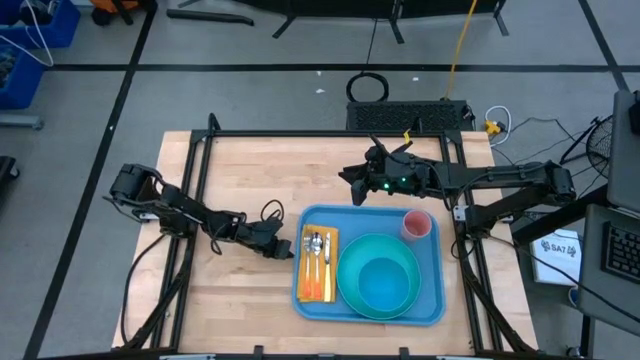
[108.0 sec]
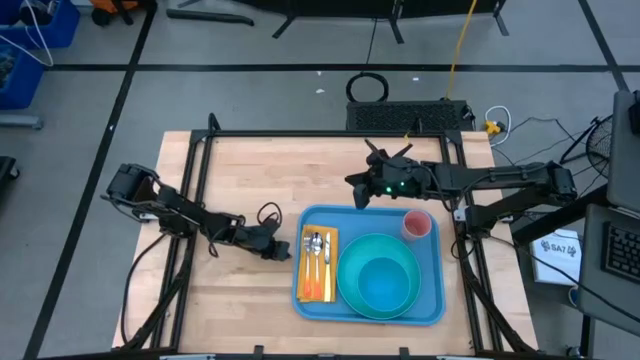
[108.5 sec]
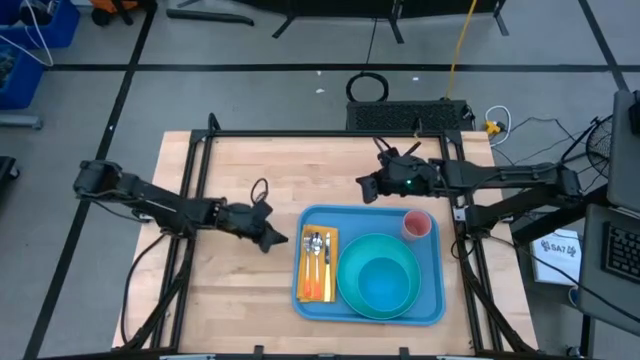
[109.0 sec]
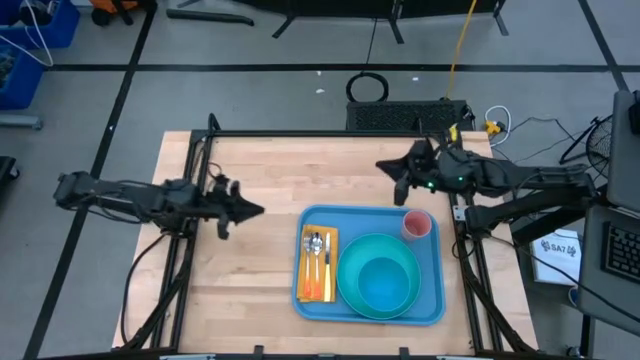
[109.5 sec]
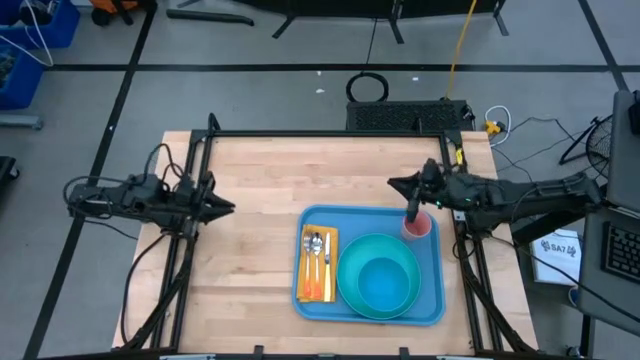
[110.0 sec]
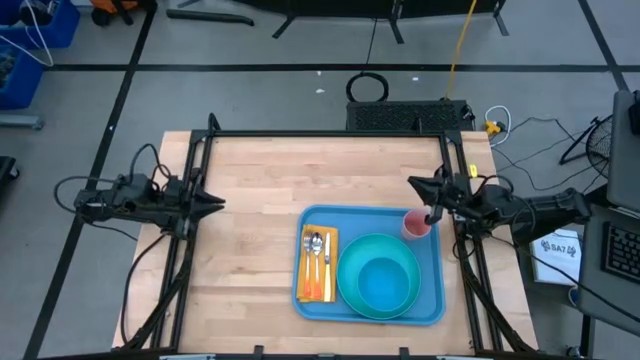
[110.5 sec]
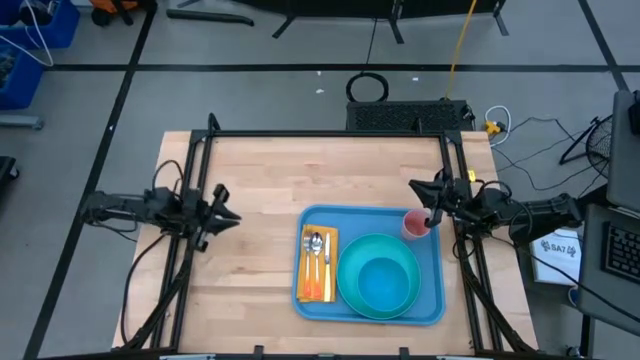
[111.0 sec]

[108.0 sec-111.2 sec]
Task: Set up tray
Return to Home Position

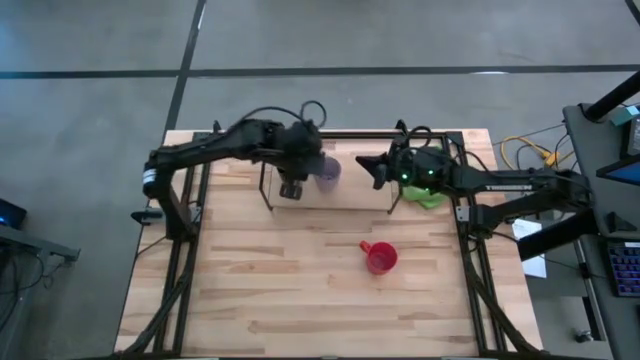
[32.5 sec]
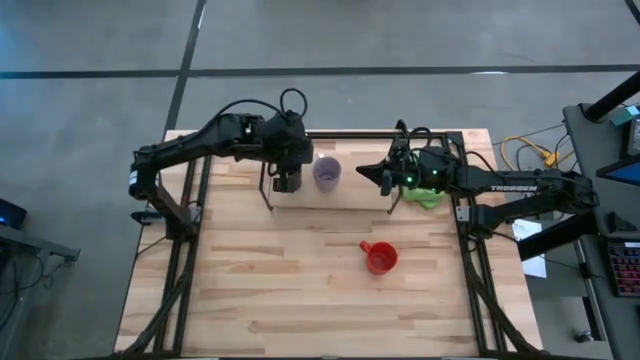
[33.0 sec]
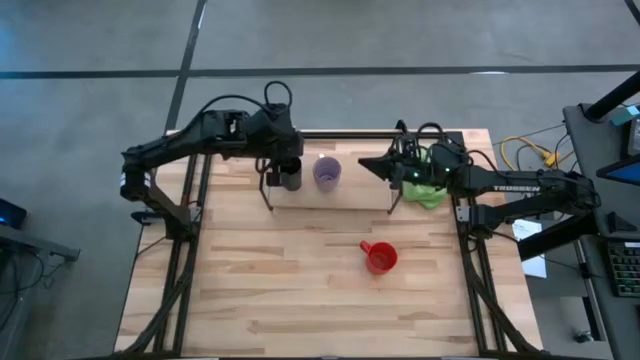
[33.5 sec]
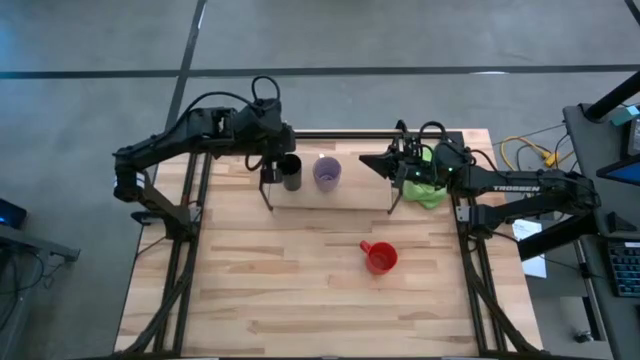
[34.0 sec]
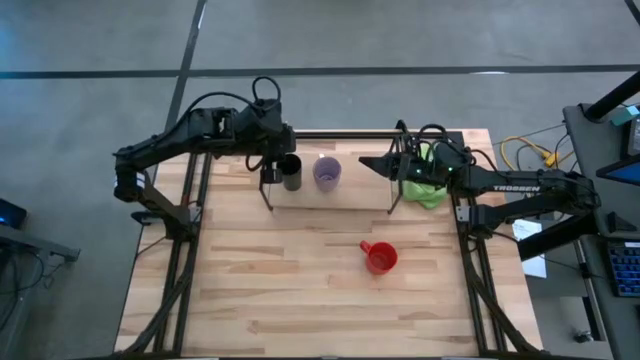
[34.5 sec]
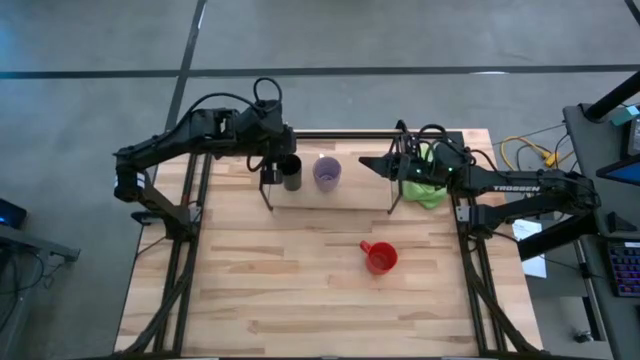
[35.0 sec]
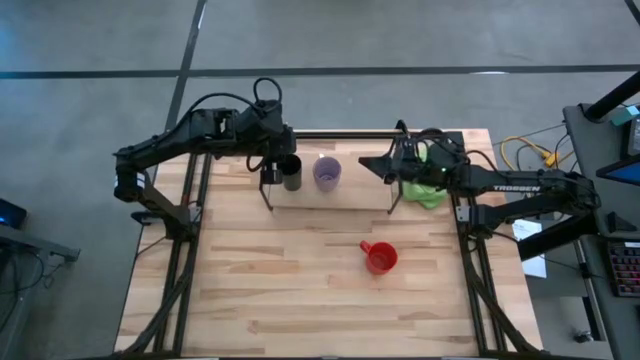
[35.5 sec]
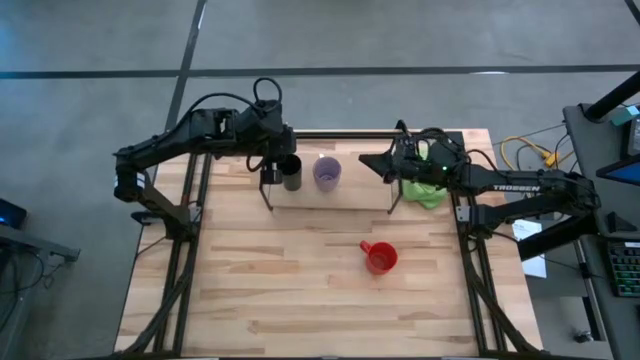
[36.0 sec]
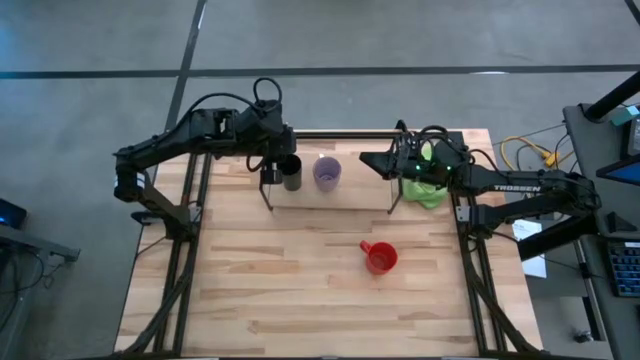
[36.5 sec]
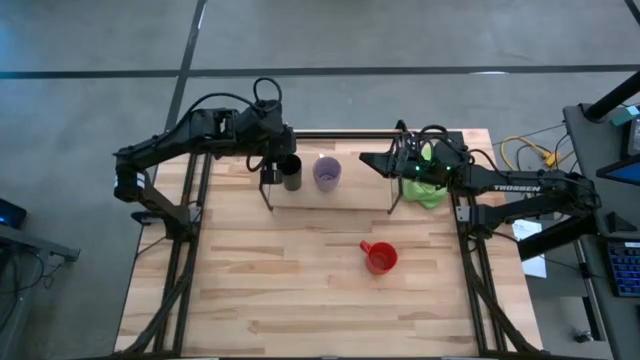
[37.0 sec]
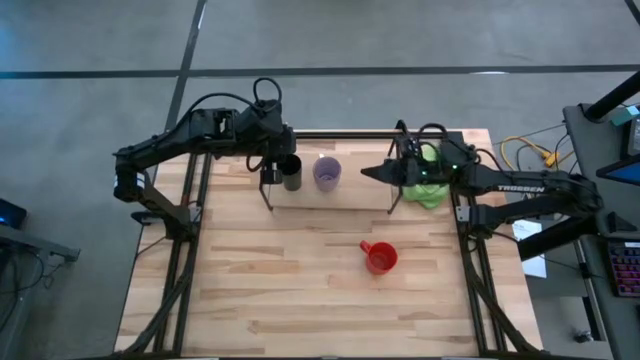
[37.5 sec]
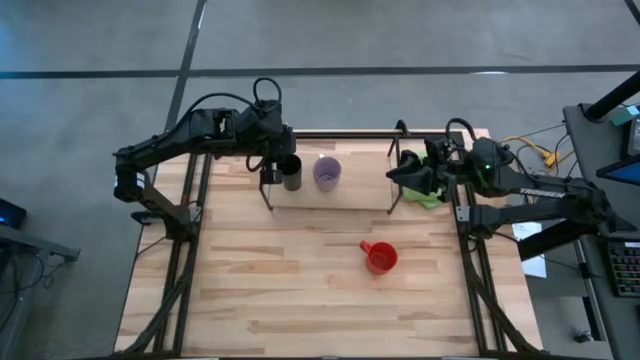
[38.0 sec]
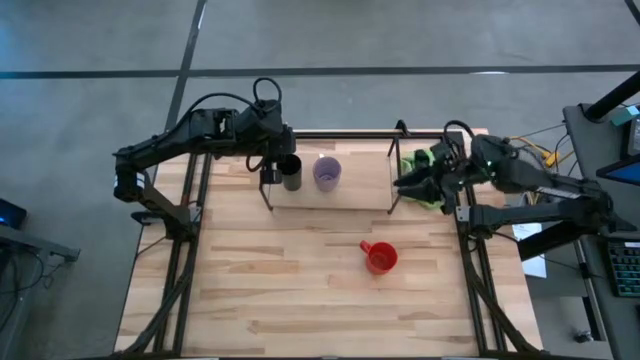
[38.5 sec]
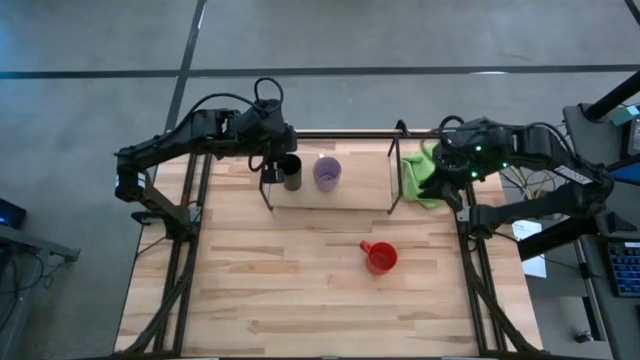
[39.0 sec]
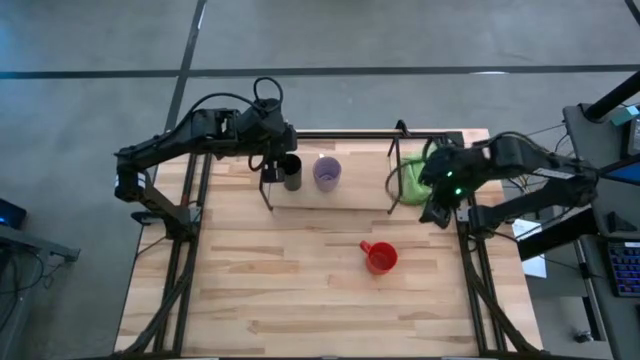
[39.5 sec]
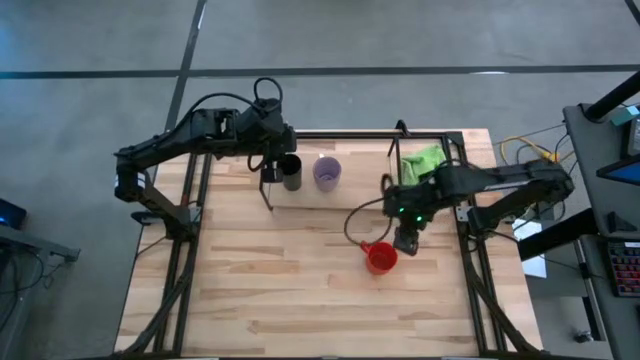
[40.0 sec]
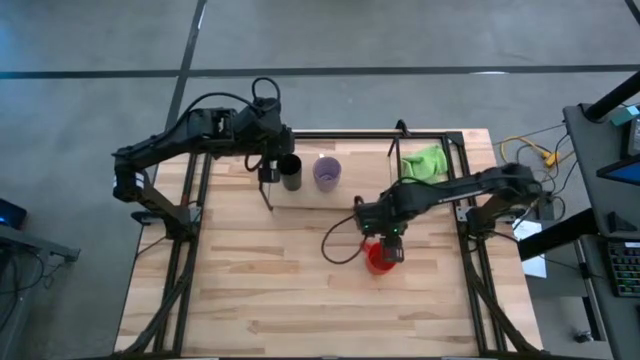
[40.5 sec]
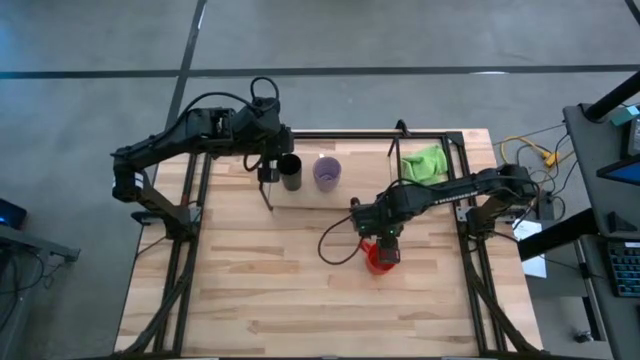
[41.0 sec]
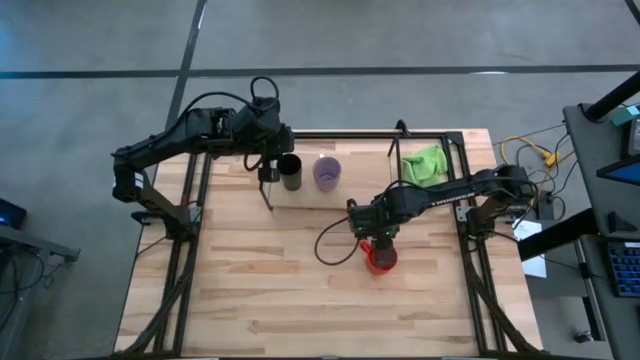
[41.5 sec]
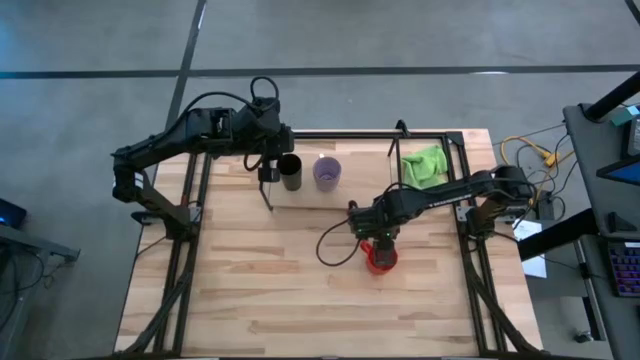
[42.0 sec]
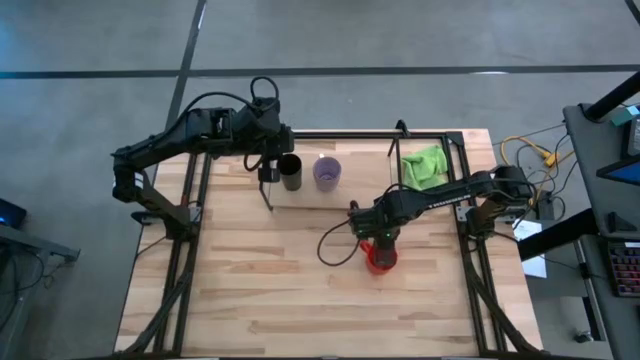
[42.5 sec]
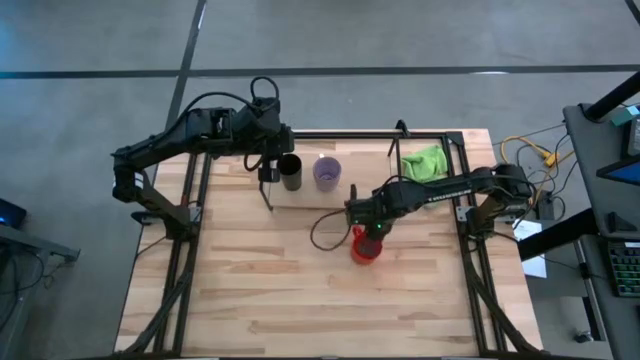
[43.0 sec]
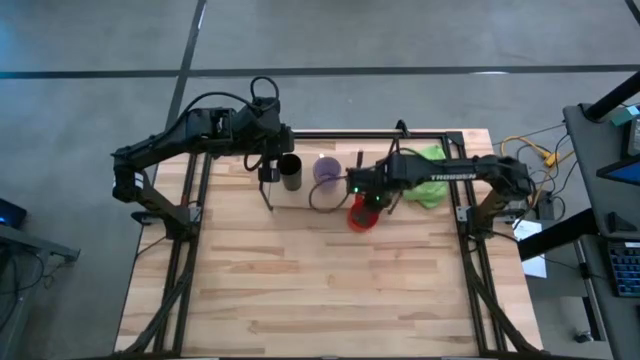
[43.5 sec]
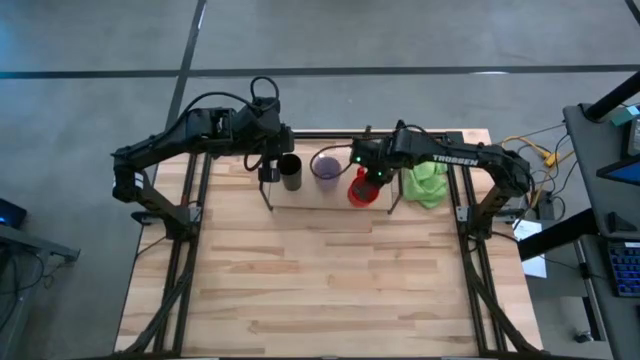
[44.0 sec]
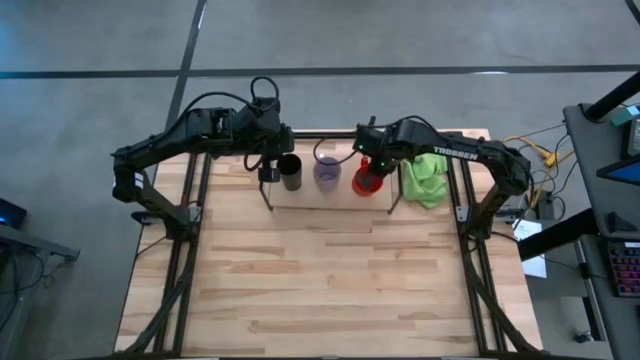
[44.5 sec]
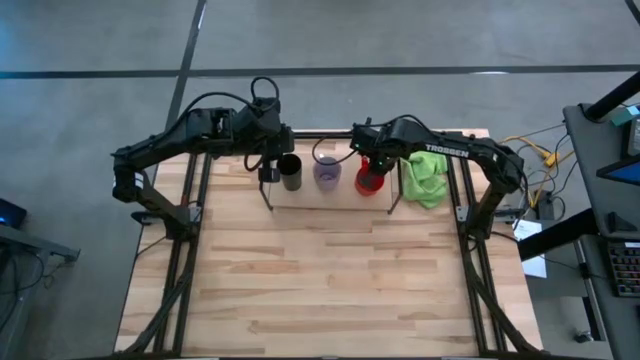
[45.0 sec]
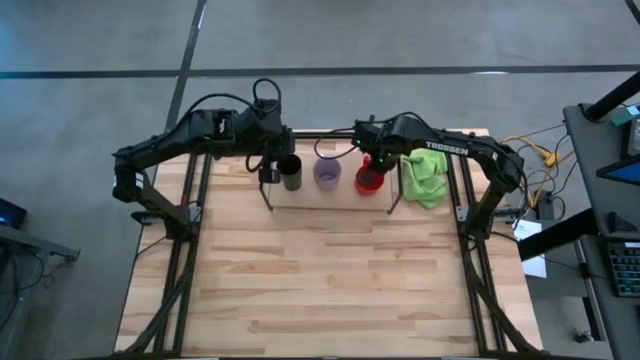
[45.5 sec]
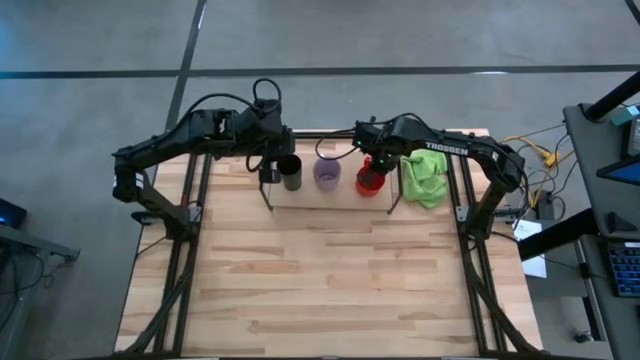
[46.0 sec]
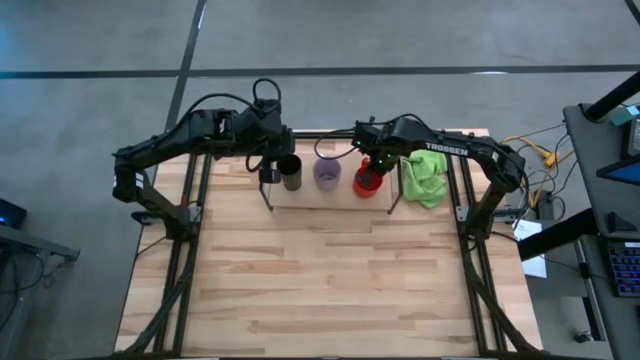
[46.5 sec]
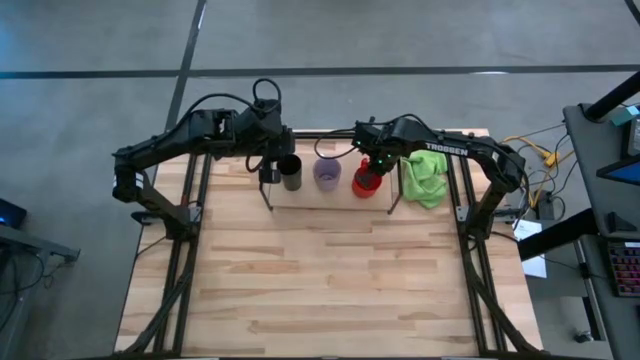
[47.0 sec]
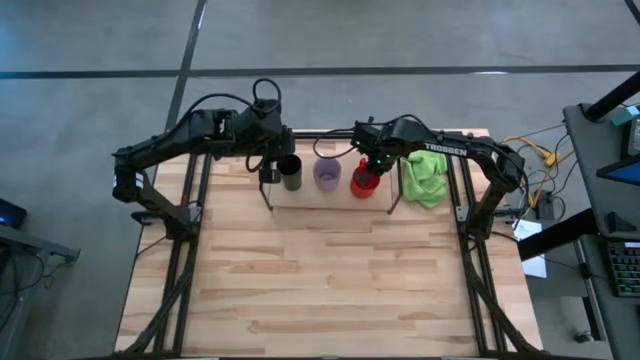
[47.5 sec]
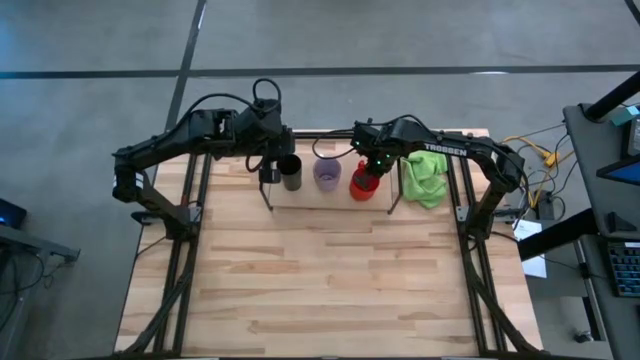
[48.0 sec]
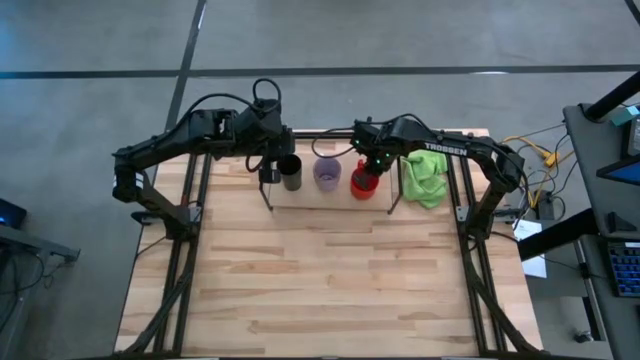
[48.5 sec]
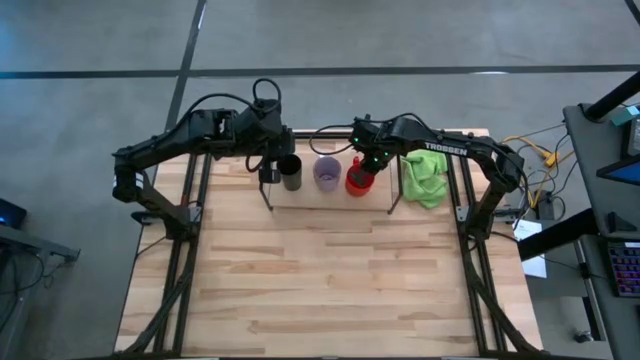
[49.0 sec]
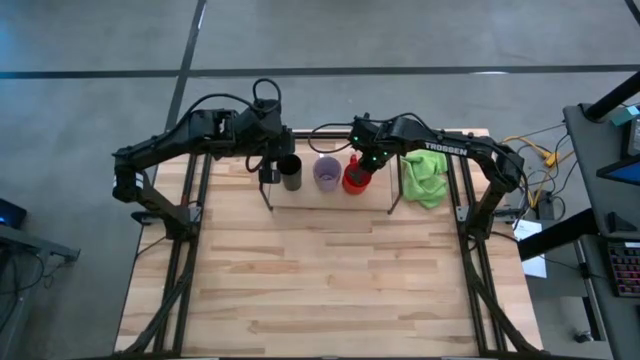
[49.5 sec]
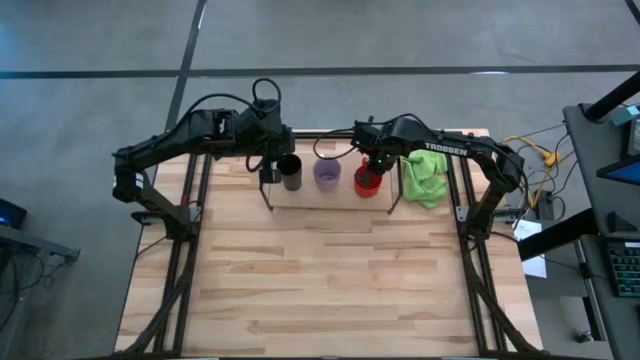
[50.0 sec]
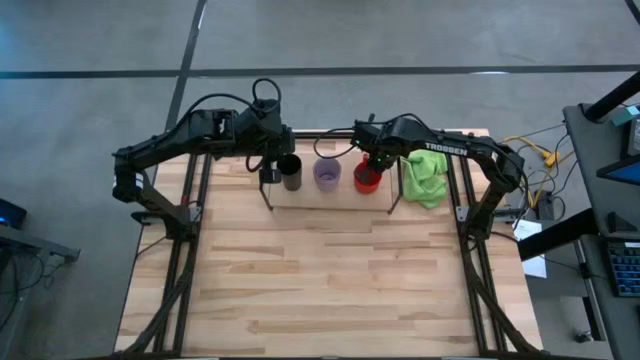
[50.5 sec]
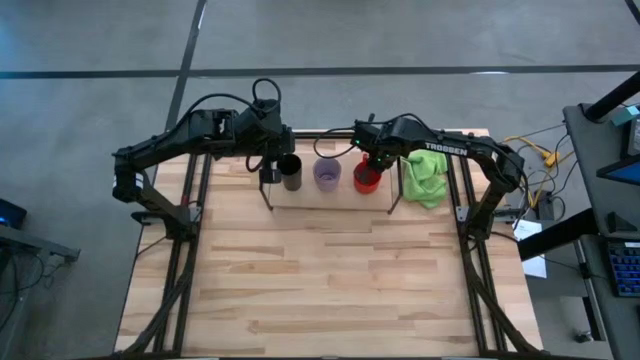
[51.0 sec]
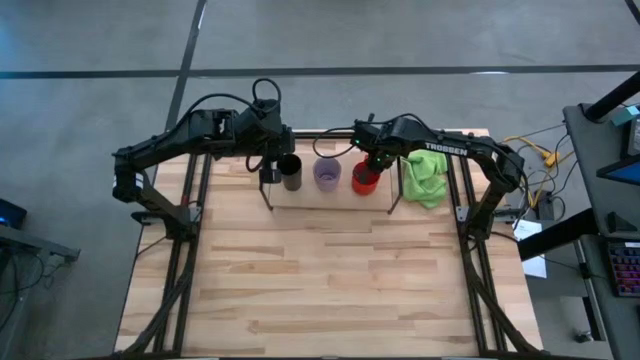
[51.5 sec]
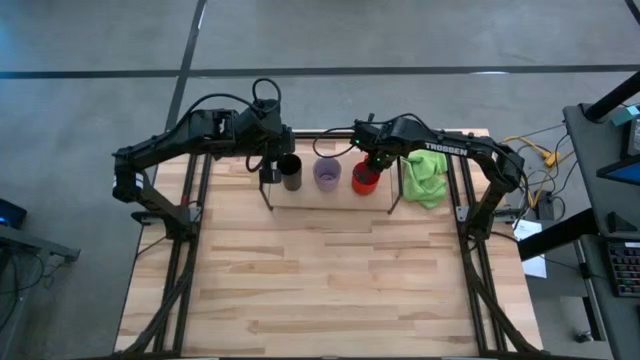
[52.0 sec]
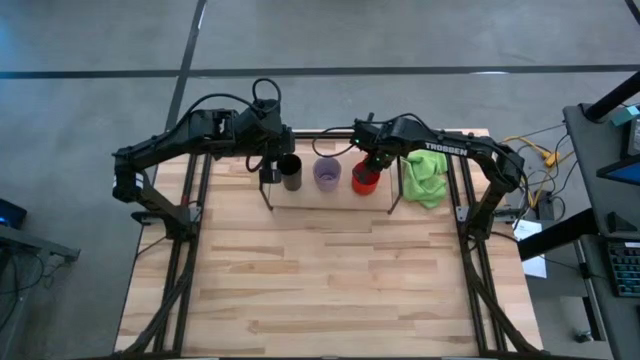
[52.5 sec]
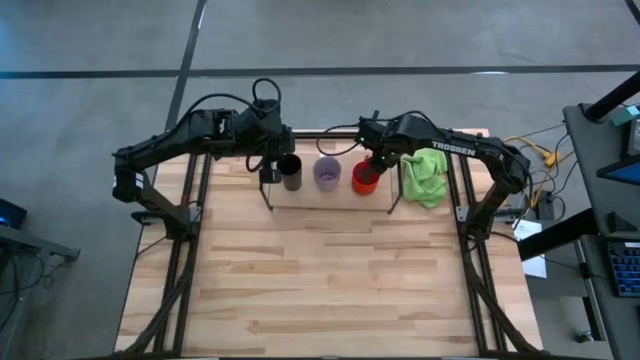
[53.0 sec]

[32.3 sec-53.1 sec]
Task: Stack small to large cups/mugs on shelf
Put the orange mug on the shelf
